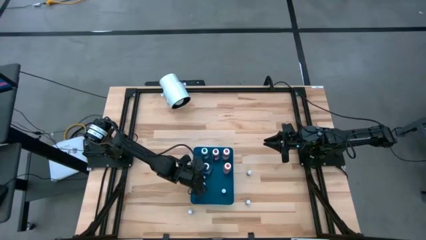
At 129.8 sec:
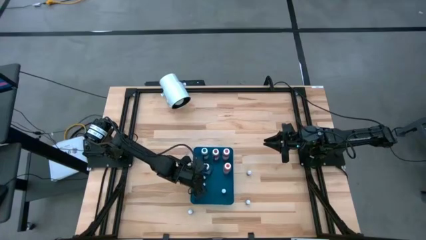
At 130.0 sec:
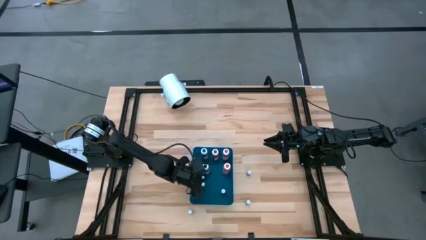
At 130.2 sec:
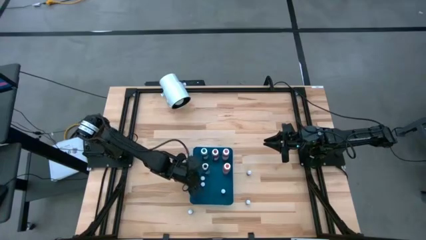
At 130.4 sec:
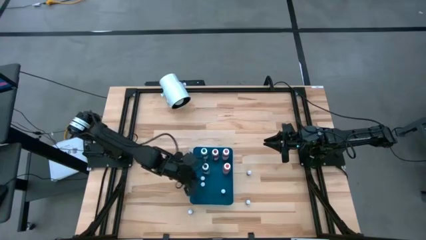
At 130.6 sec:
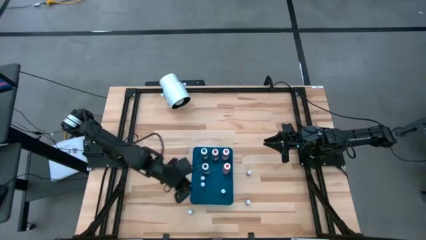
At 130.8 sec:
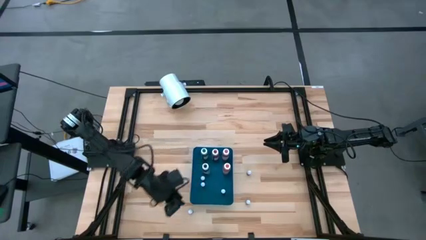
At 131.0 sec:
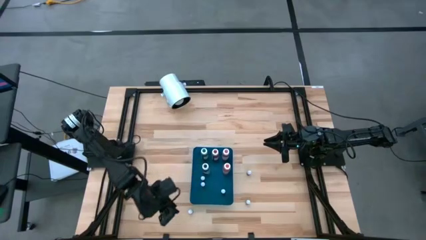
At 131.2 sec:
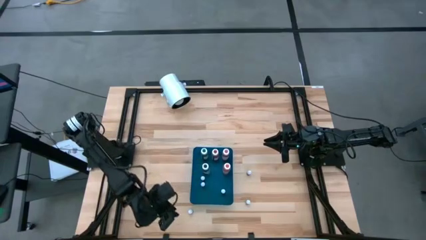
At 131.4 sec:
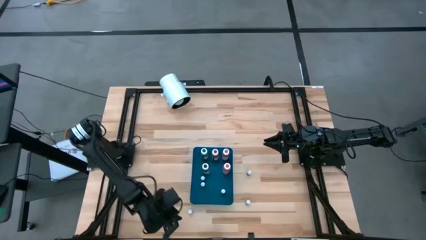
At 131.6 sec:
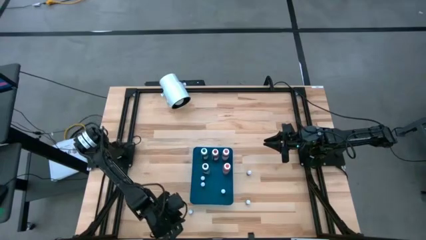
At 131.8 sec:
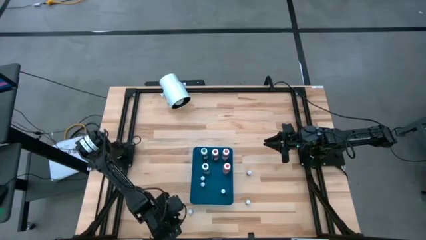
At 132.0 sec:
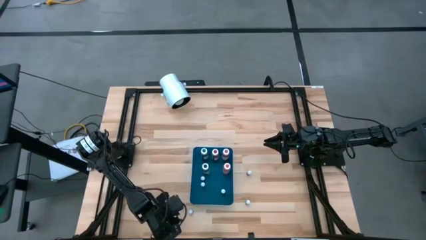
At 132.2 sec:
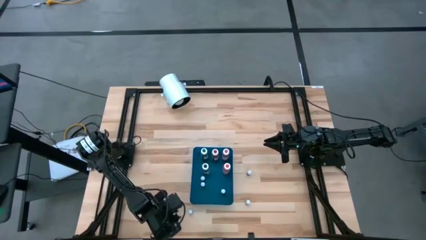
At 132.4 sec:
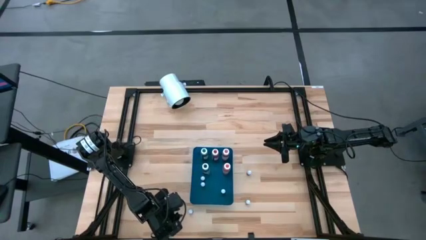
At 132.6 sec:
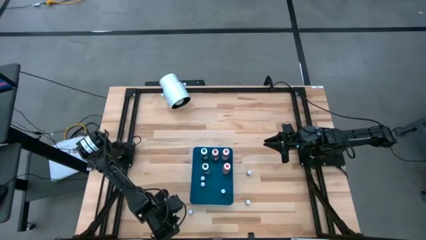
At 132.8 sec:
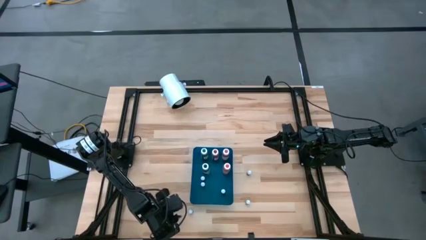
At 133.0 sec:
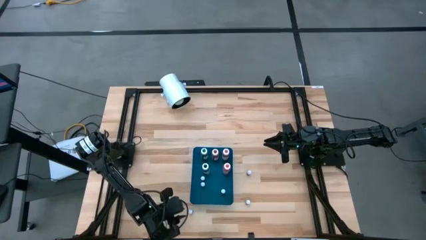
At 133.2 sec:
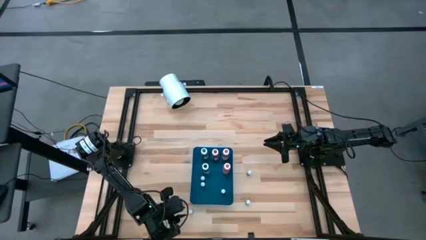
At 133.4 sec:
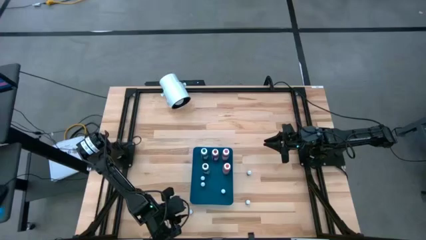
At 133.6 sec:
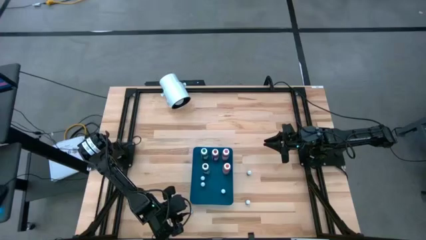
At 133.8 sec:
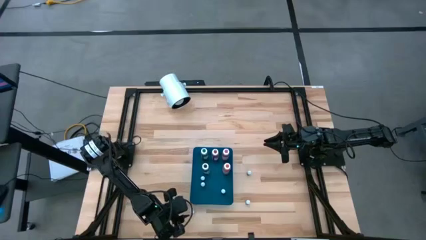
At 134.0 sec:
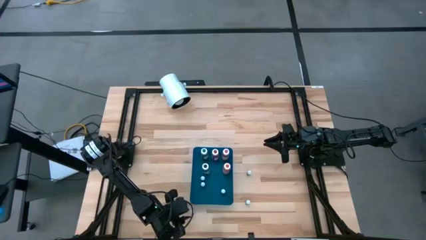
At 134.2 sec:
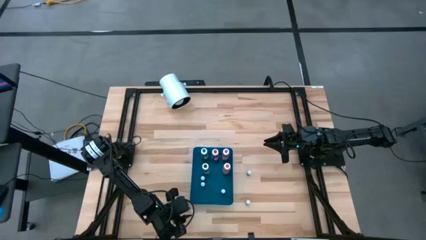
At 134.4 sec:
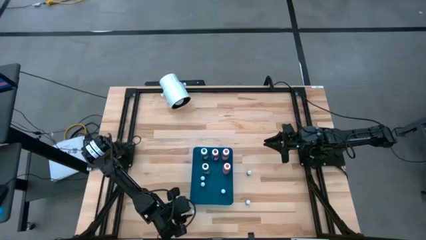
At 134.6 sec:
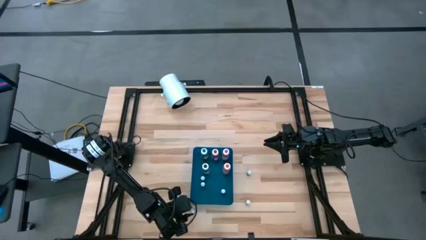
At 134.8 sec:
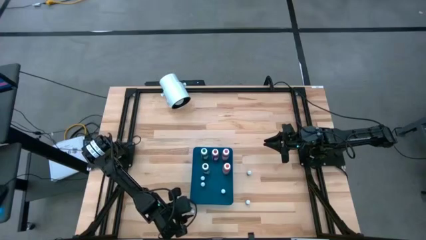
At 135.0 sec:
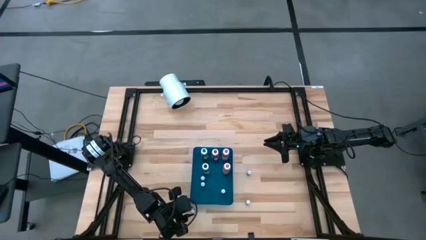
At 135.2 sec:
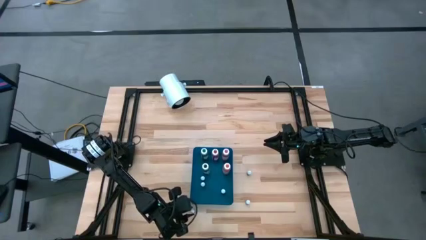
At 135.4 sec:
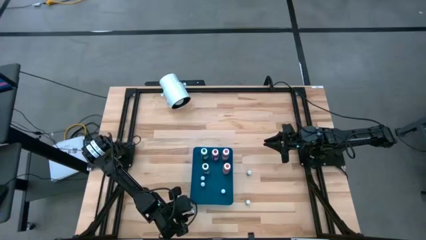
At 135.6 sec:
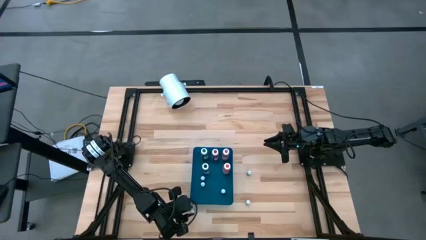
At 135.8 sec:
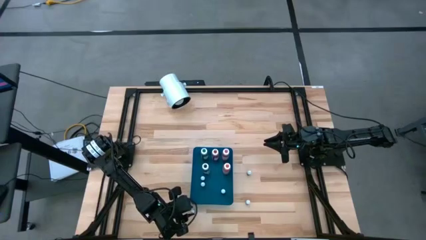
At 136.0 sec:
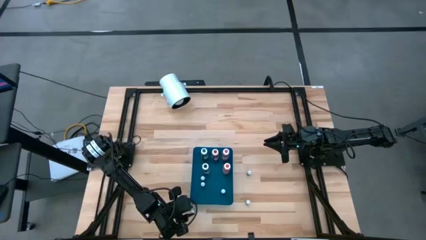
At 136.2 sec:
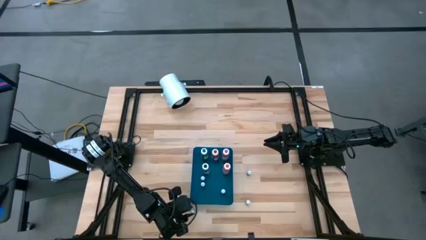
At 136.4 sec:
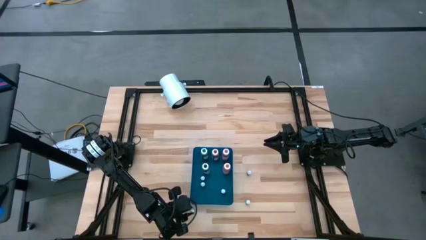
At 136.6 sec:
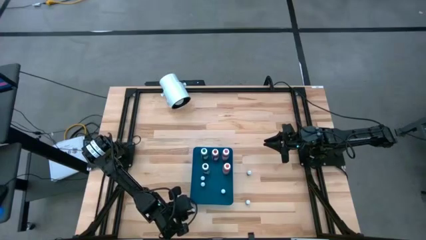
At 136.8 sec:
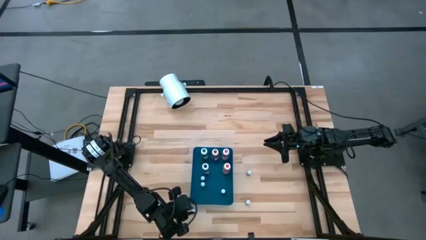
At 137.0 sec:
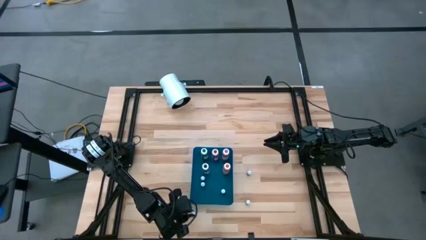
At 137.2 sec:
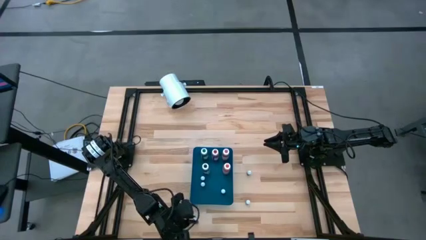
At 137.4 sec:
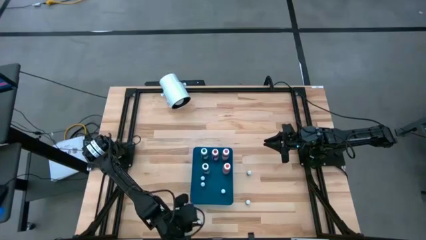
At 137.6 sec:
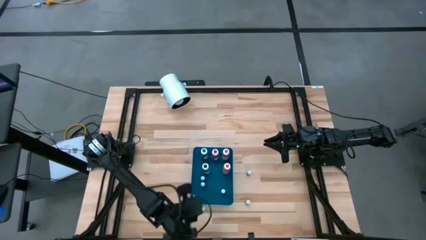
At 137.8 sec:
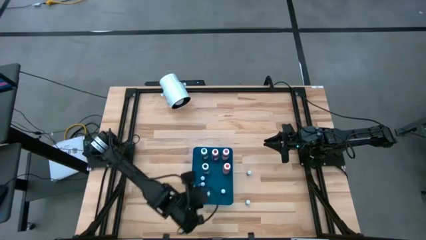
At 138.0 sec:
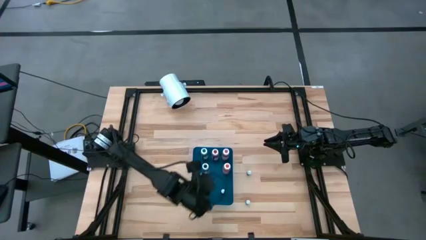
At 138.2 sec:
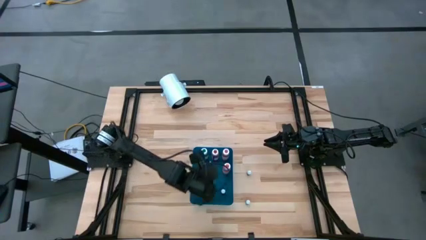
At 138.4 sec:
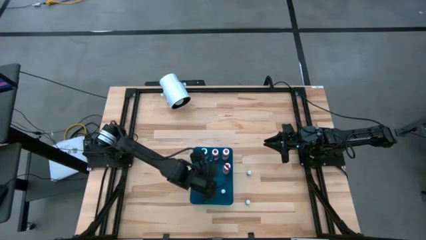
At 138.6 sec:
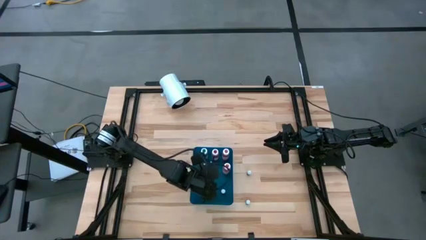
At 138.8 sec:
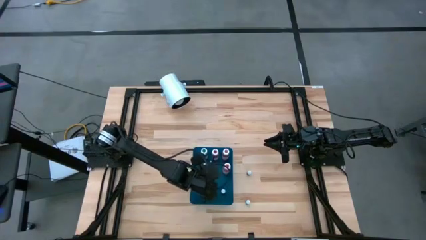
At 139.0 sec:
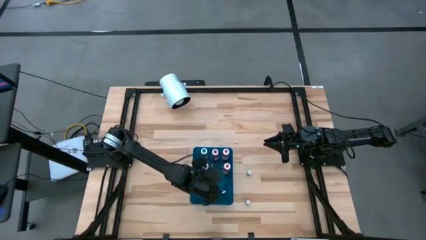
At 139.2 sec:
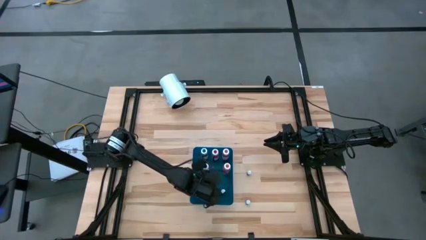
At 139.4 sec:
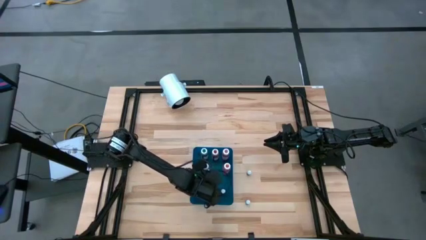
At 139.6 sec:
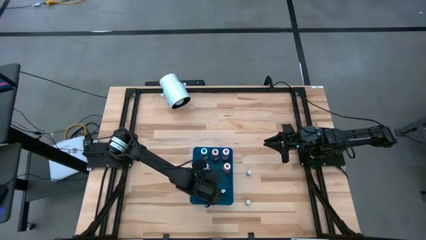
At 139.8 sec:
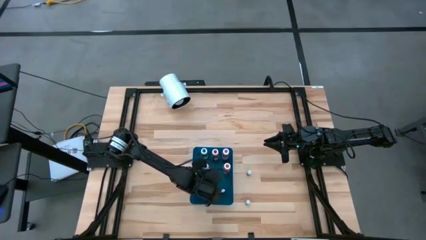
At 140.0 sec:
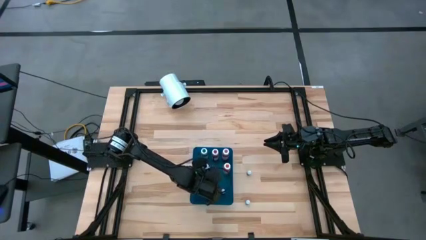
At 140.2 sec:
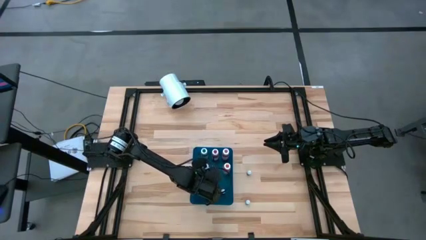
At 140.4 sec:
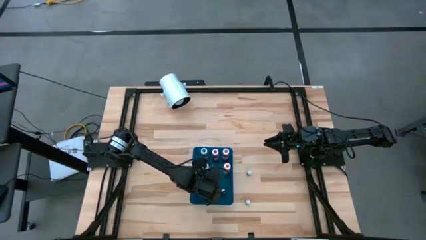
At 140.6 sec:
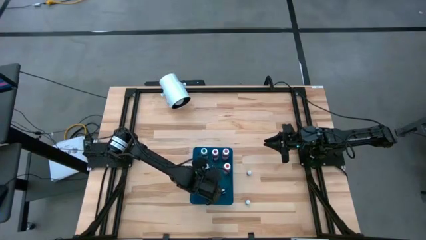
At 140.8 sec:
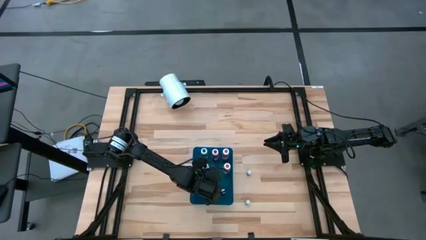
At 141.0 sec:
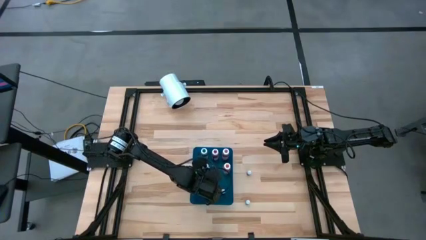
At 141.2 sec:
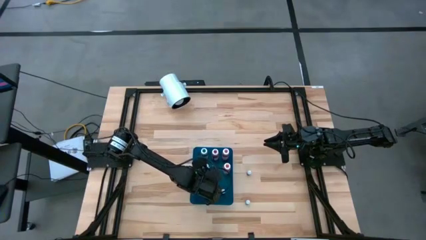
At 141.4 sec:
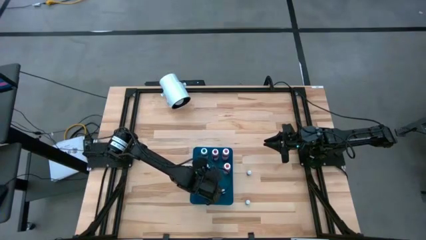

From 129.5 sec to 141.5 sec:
Task: Pick & Place food coloring
Put the small black food coloring bottle into the blue container

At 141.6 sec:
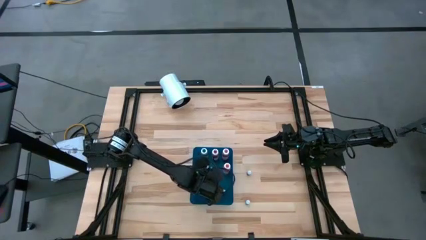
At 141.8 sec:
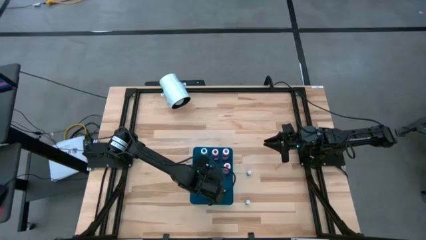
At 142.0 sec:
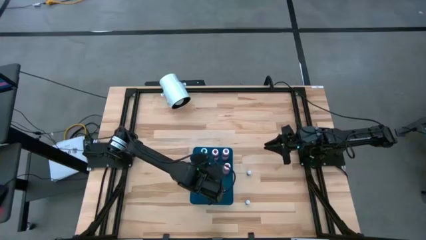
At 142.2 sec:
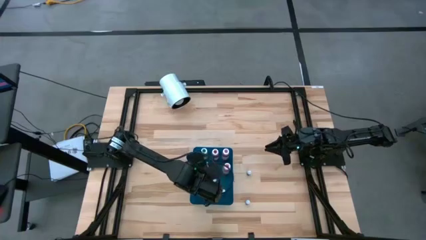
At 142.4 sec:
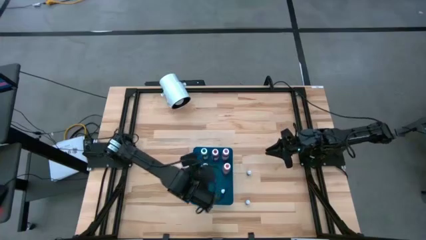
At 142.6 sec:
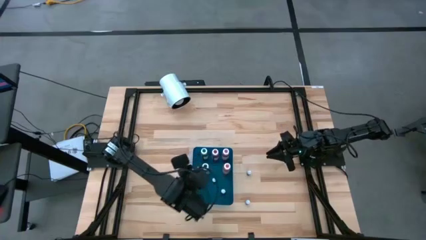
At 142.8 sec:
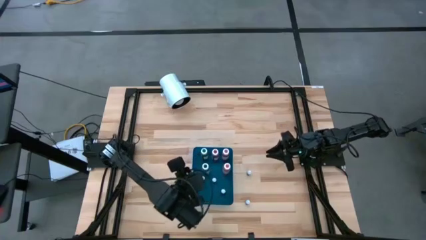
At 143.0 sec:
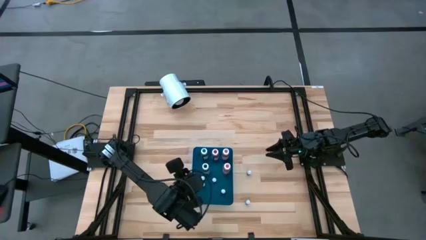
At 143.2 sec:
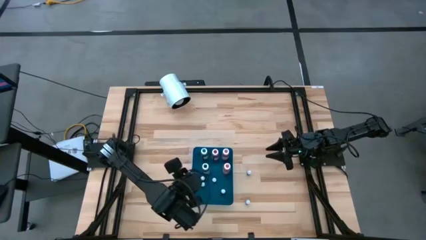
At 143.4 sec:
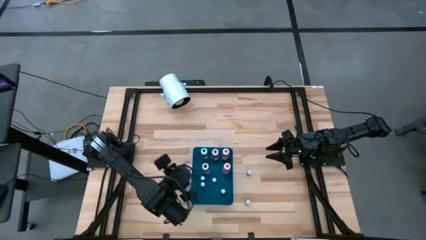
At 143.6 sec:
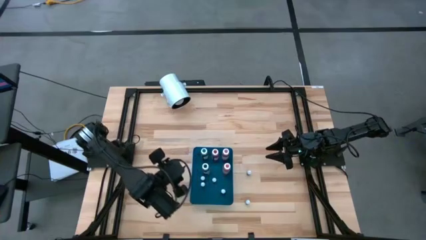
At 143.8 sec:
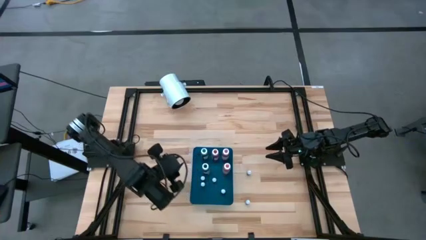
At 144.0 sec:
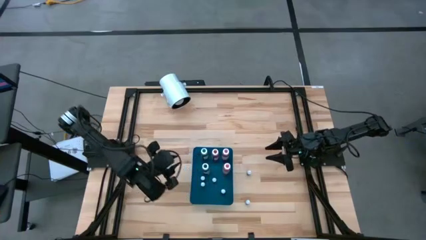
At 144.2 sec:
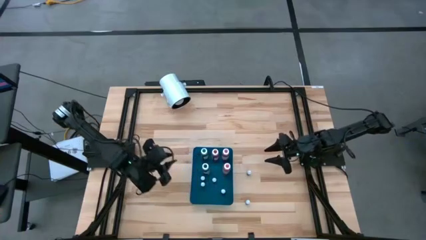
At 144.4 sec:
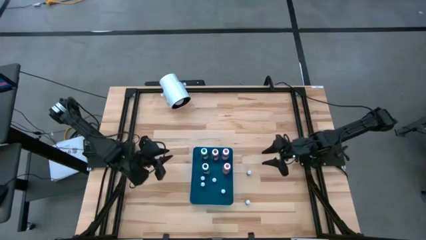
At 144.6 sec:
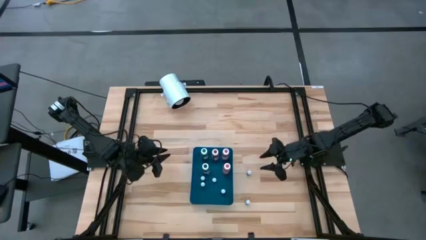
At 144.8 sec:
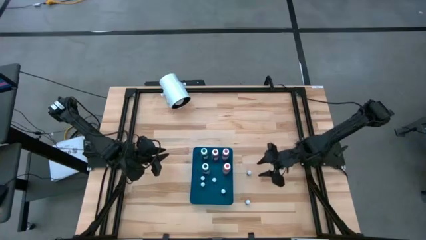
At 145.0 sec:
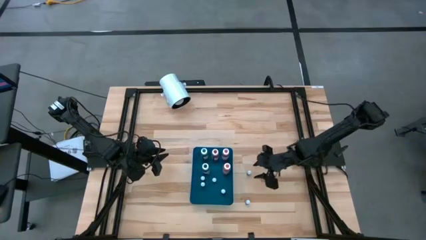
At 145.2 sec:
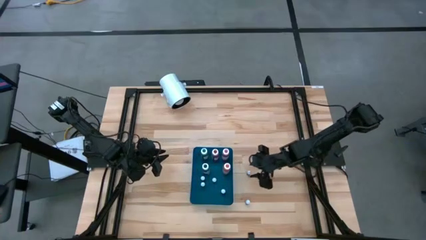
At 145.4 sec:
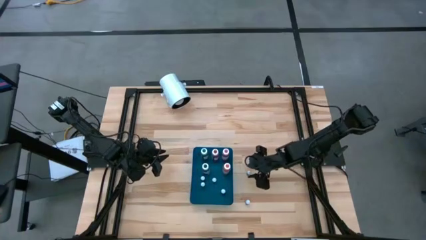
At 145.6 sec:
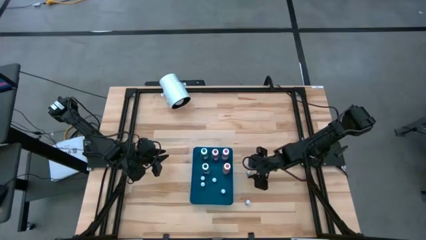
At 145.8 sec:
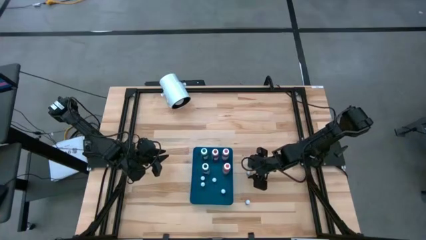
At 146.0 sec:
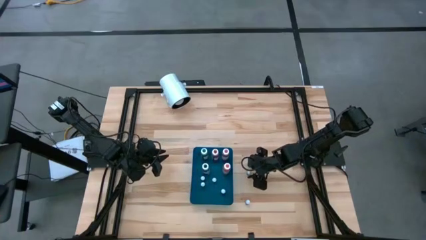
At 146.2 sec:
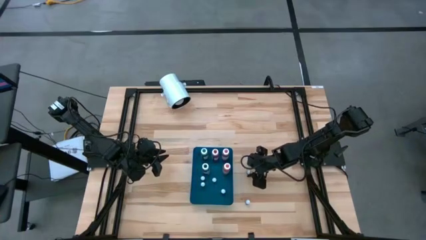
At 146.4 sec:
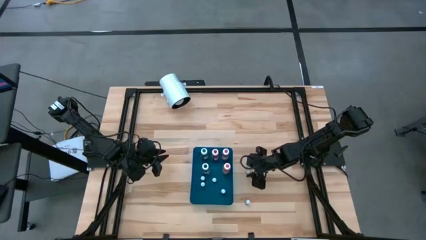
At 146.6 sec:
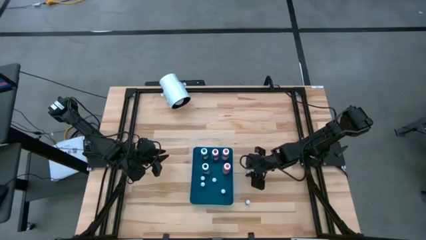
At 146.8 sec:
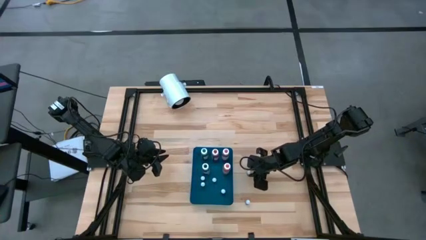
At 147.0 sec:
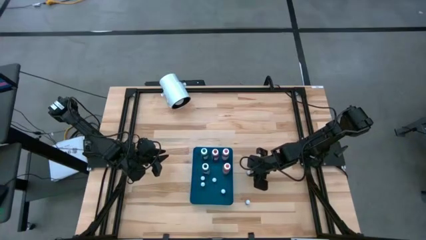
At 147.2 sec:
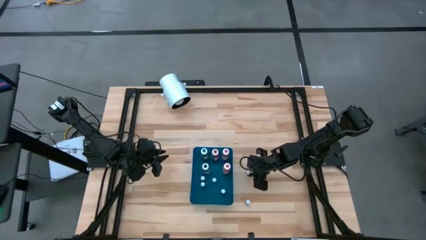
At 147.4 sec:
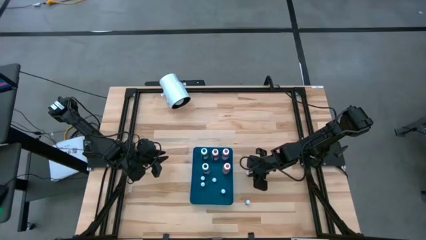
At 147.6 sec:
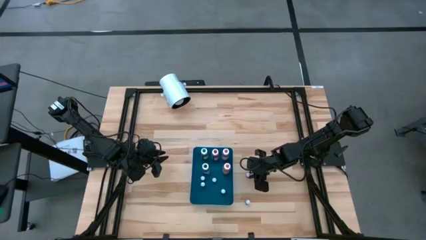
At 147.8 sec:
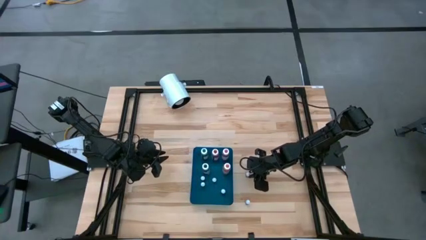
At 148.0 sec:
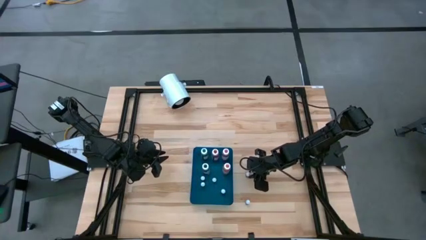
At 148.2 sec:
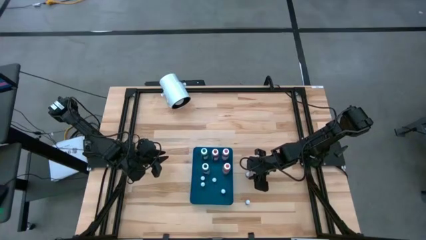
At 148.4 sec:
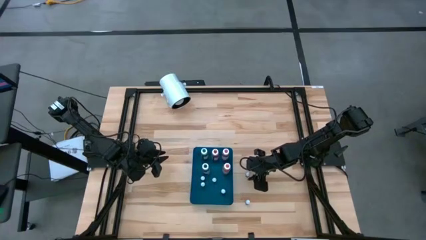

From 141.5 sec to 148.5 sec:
Put the small brown food coloring bottle into the blue container
